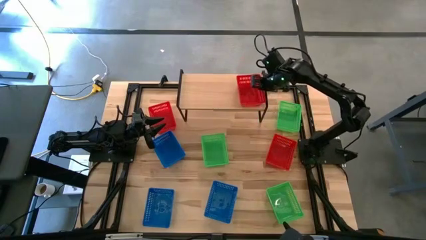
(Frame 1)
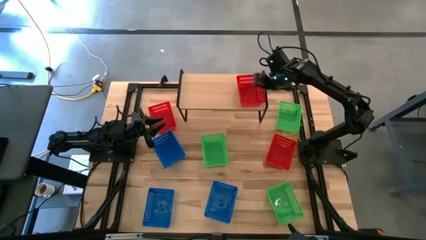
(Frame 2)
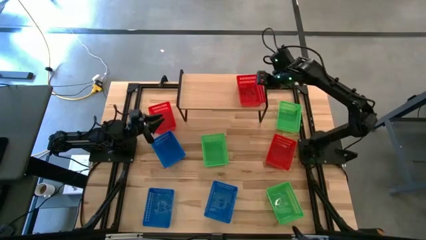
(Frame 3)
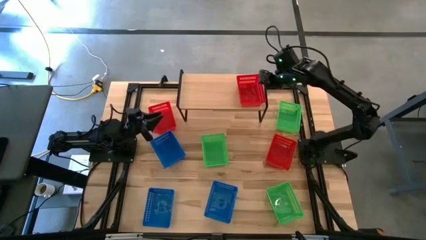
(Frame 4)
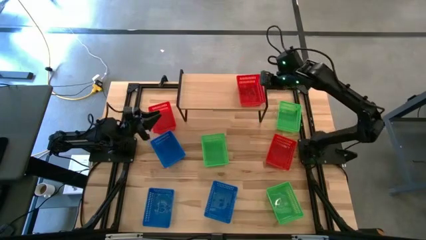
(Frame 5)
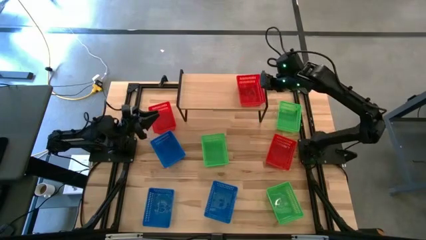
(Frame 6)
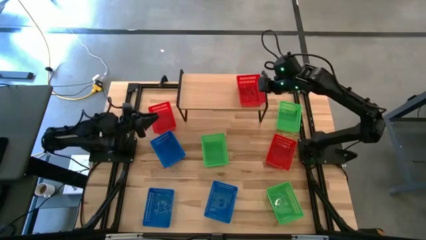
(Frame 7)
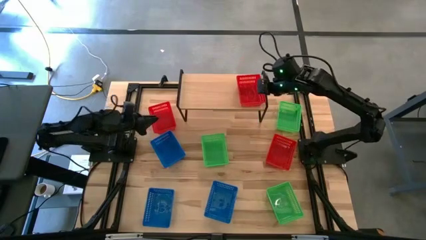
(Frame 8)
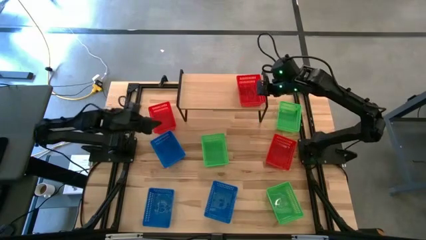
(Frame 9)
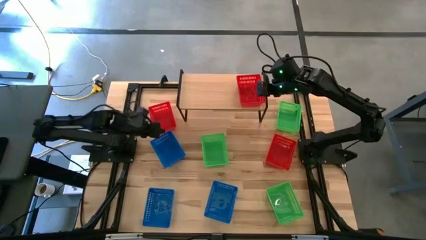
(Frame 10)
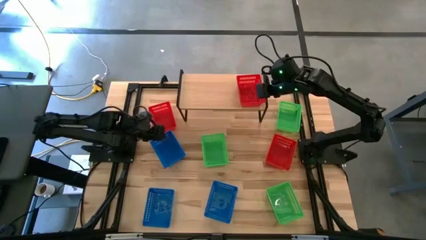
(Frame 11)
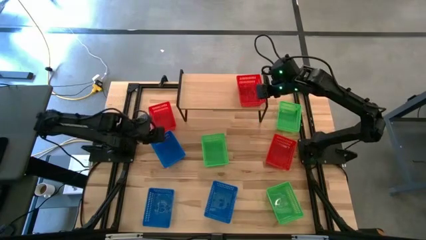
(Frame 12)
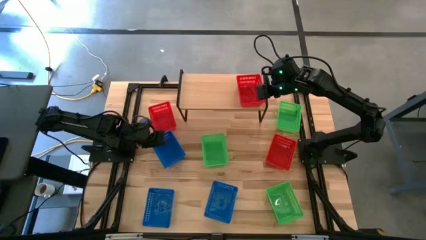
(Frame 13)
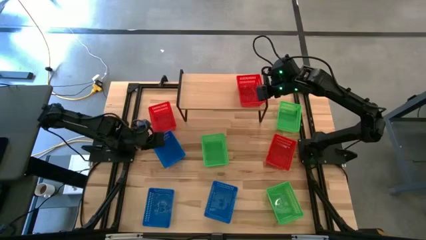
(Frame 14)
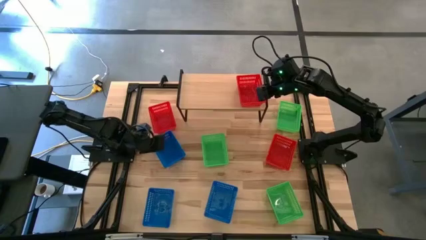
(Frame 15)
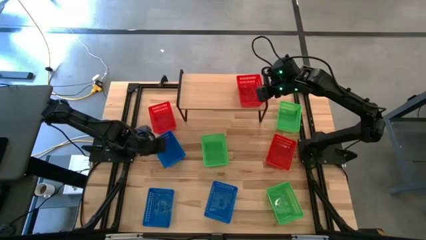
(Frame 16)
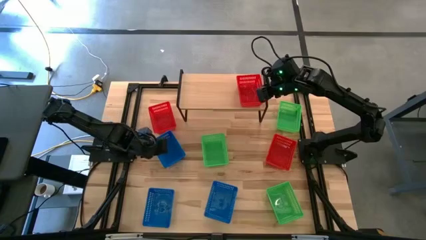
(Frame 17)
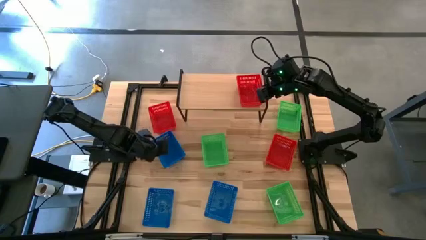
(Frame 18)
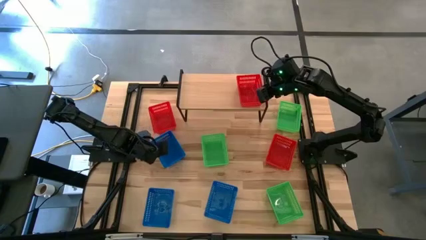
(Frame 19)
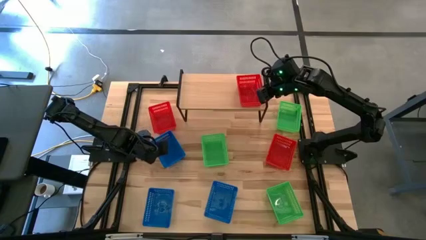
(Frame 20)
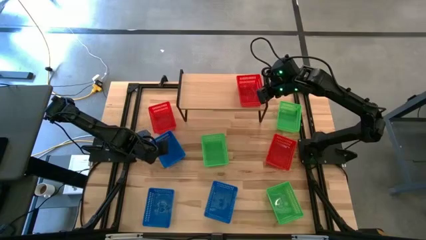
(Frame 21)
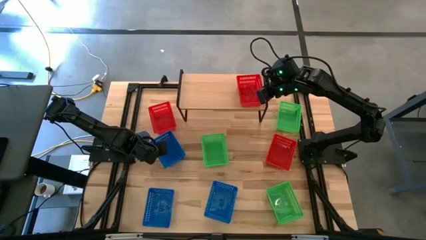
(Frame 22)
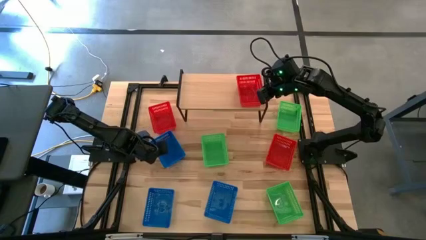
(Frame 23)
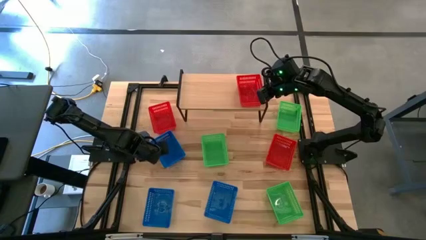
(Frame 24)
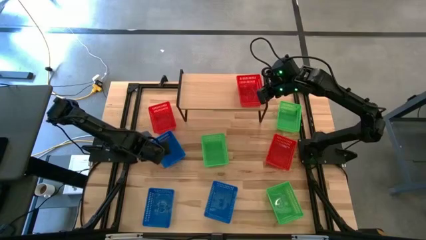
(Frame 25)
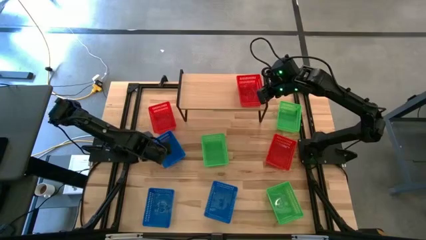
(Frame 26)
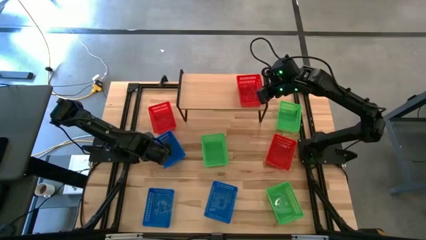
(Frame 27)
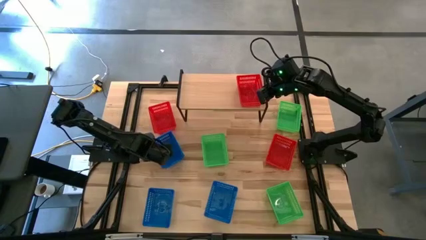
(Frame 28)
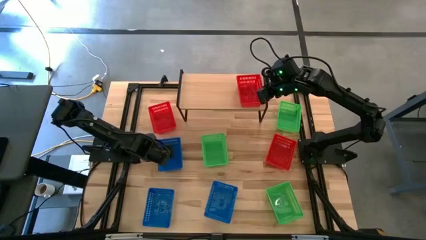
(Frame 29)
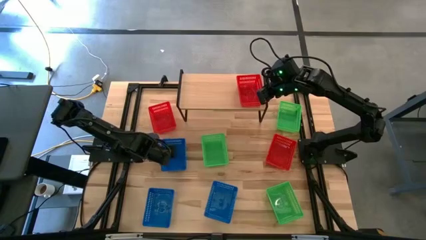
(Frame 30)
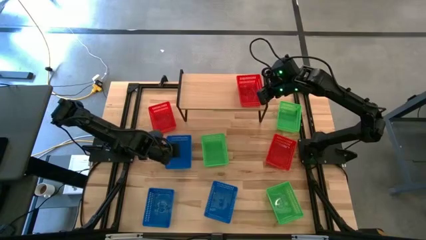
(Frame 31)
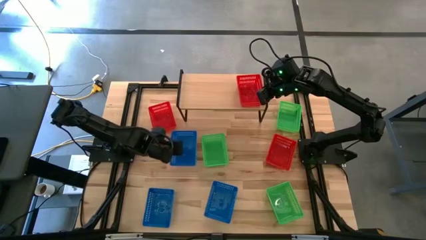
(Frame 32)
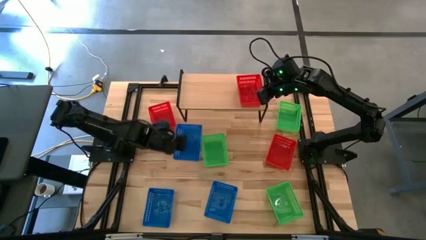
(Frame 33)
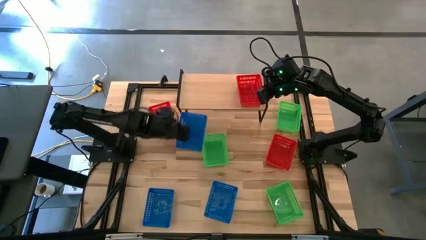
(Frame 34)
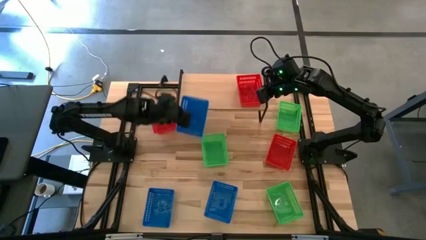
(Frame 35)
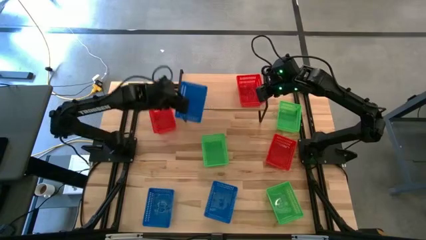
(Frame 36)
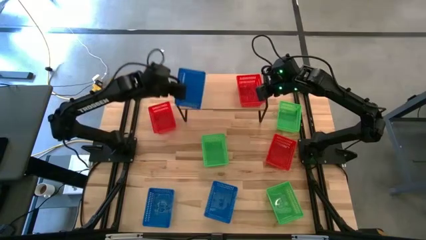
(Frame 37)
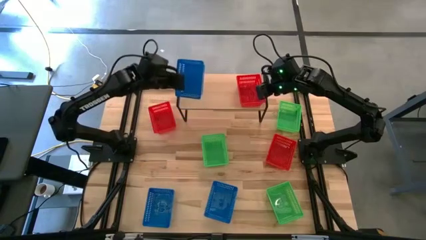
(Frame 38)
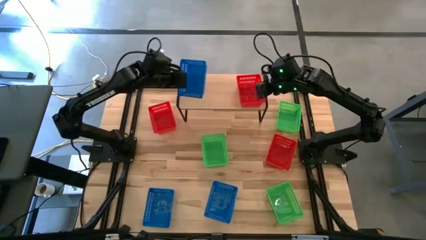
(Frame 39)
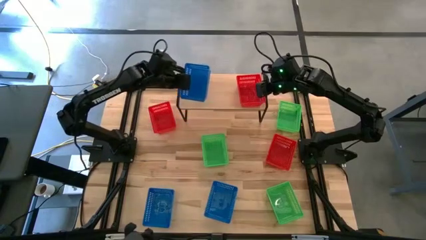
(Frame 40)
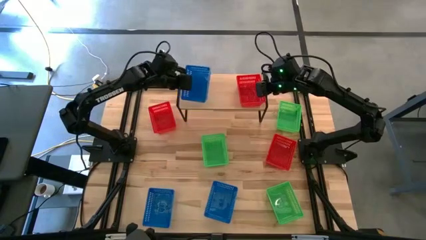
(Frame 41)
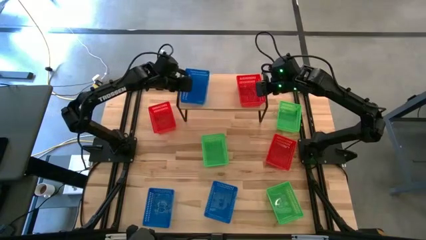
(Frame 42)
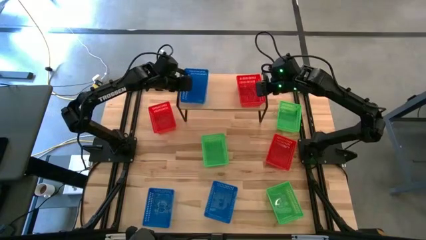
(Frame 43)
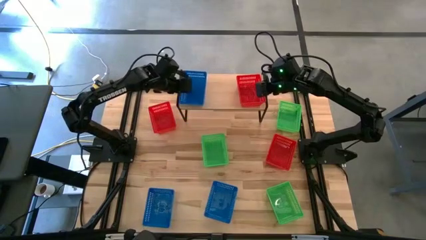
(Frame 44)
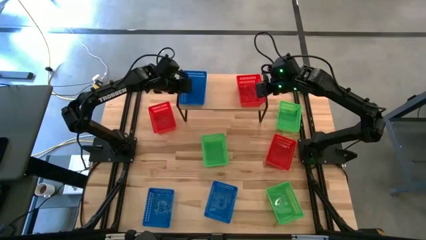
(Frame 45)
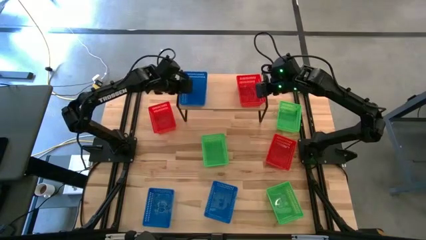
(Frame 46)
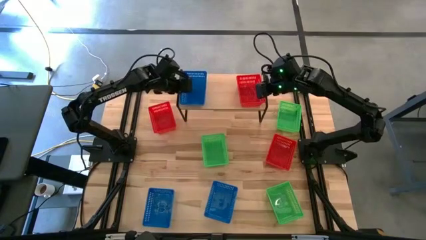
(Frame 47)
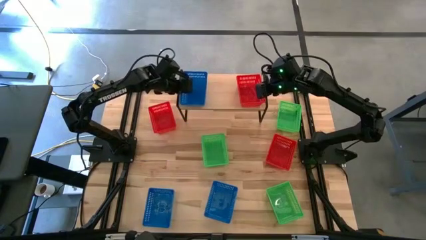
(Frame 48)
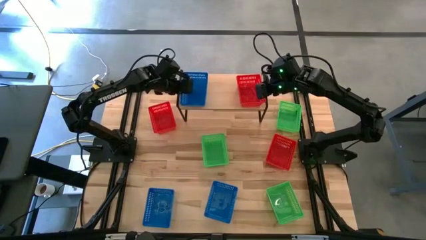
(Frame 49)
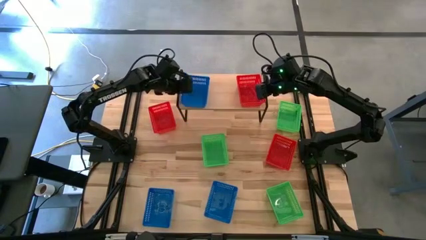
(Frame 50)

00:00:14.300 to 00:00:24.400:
Task: Stack baskets on shelf by color
Put the top blue bin on the shelf

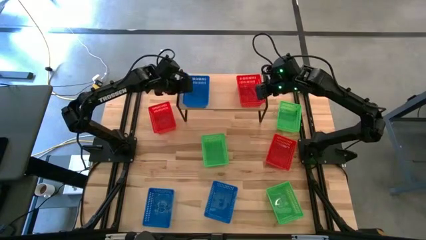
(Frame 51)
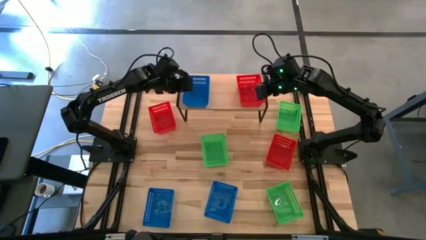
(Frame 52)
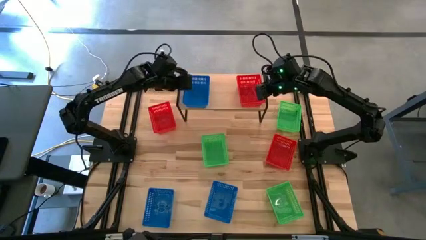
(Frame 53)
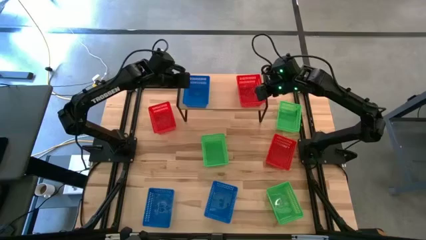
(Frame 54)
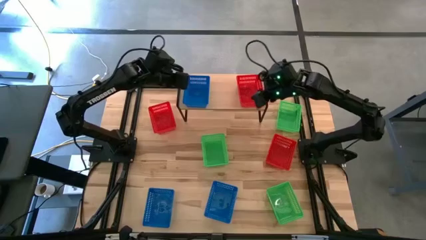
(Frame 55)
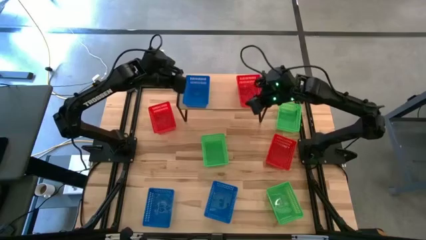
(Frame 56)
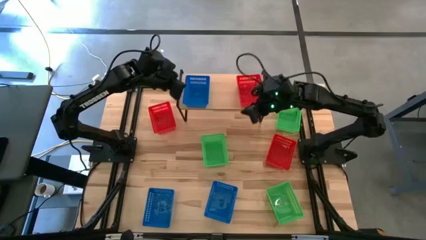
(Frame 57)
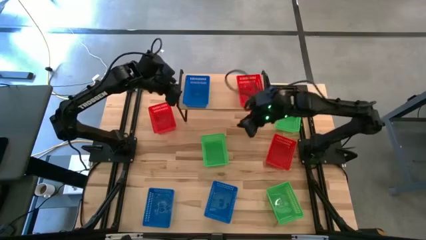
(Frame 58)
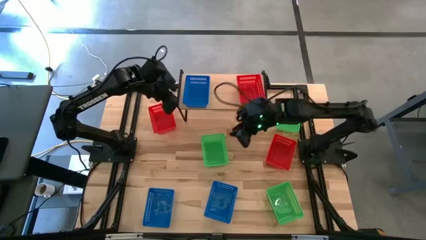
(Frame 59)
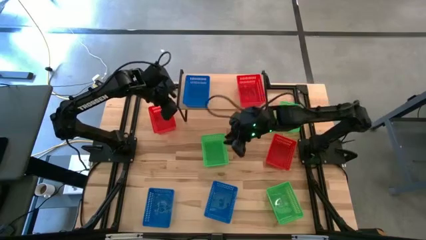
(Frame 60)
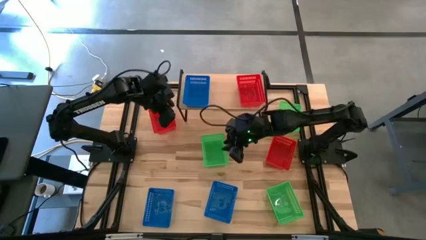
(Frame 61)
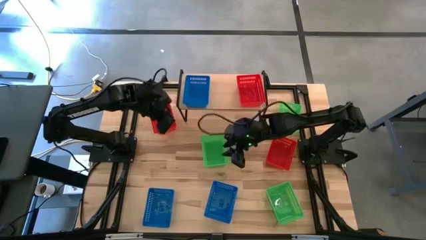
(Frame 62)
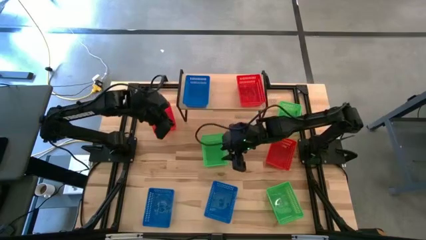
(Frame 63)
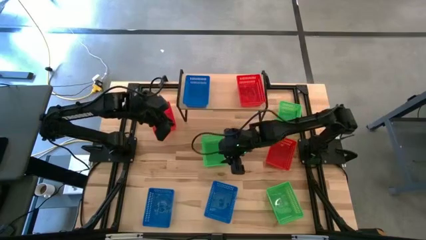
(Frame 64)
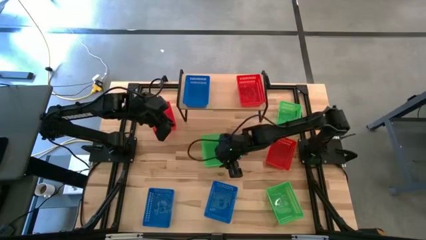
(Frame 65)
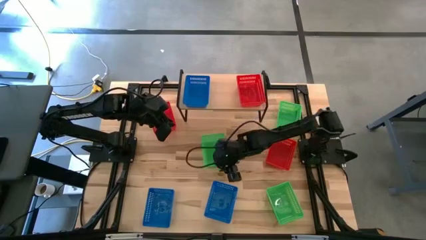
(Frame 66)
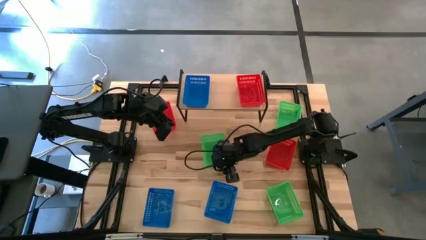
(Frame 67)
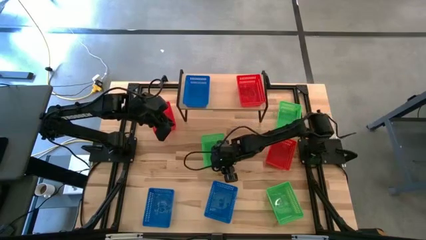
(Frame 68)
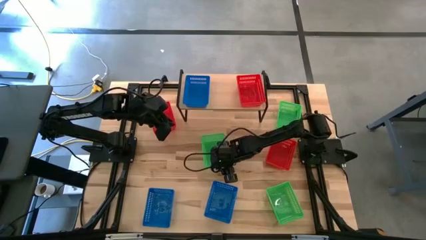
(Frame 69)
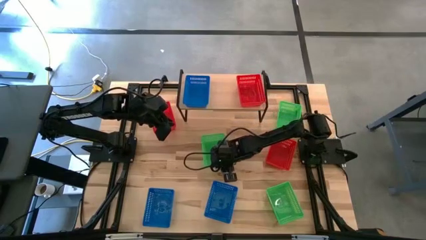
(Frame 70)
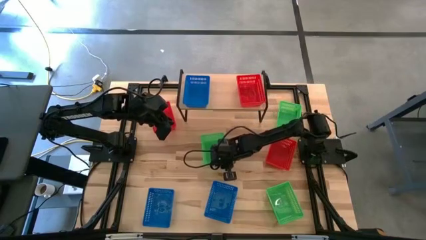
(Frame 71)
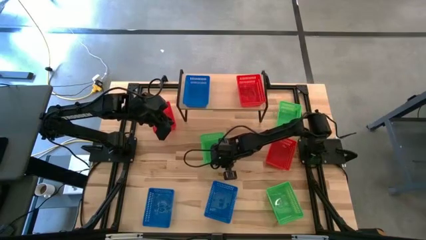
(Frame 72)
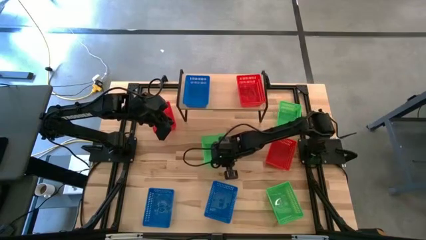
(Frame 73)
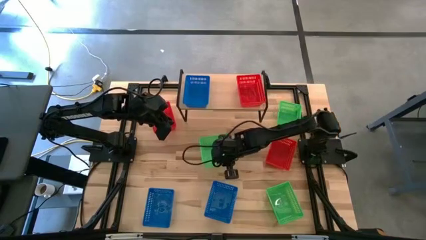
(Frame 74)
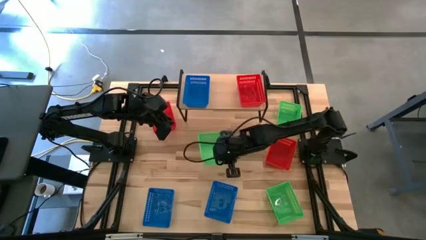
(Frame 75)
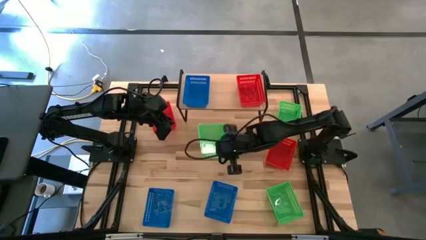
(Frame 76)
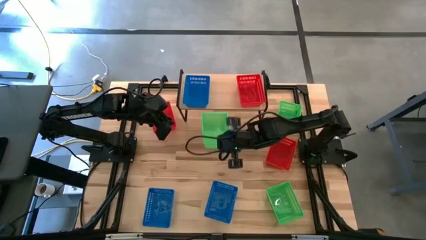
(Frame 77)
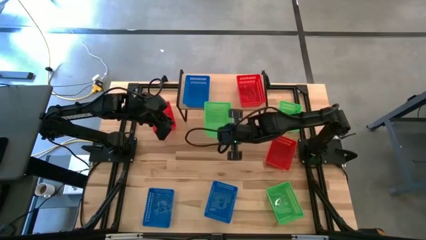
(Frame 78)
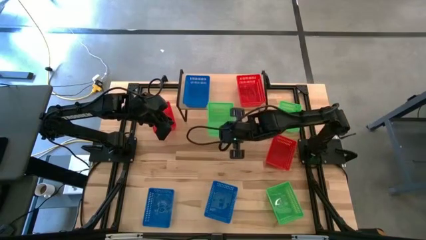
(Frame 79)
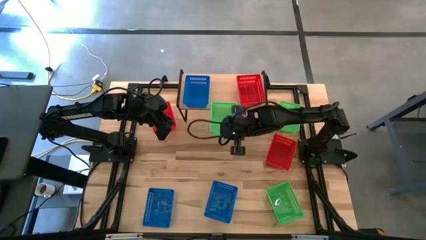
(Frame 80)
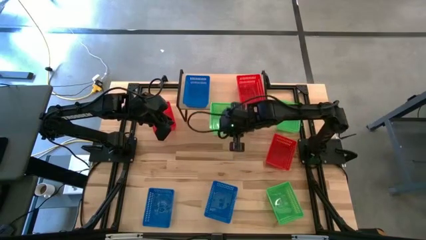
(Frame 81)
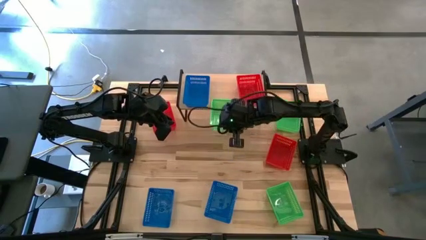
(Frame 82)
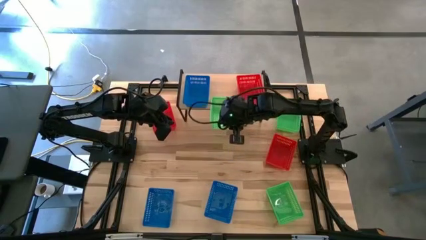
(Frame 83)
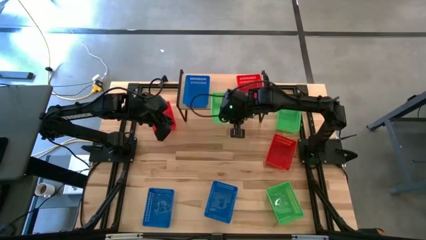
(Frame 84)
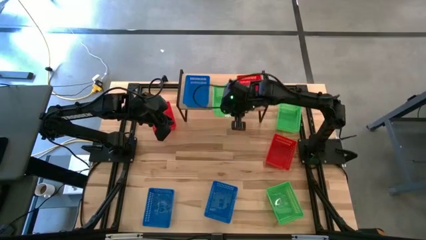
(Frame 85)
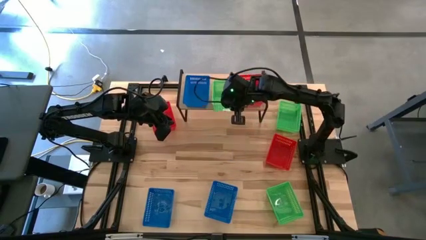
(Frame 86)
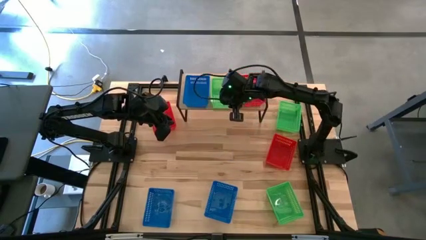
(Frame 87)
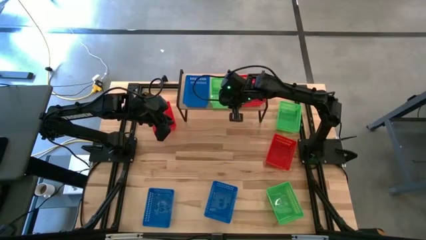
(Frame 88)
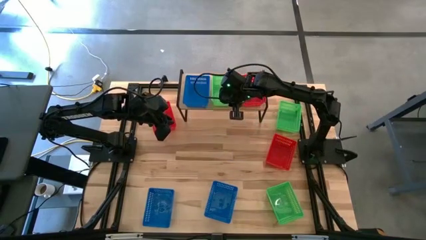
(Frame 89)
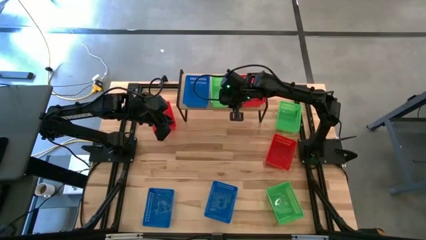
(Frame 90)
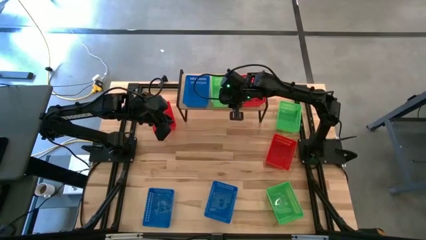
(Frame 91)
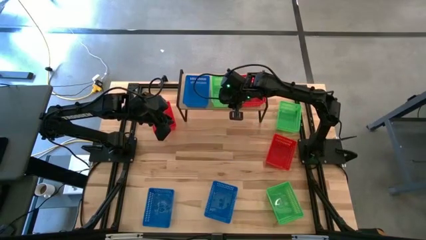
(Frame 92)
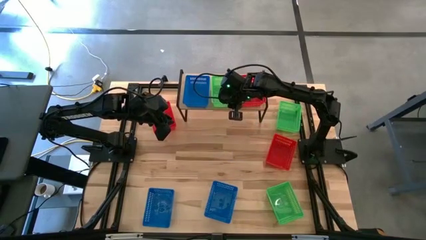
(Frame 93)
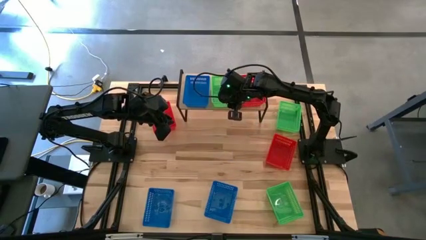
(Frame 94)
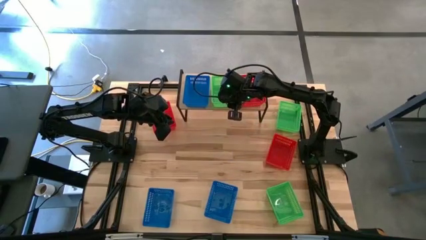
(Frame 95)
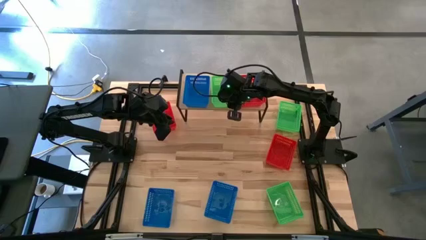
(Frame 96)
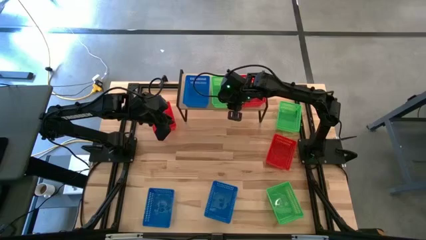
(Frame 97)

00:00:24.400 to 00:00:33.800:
Put the middle green bin on the shelf
